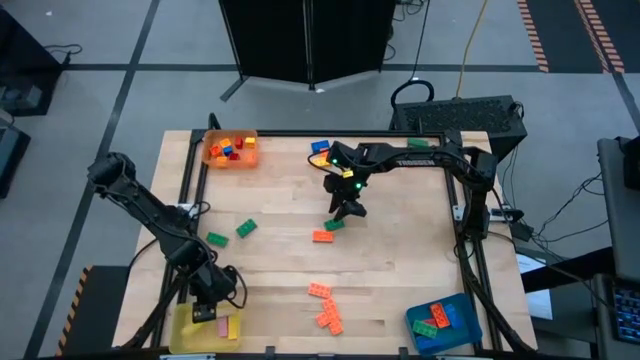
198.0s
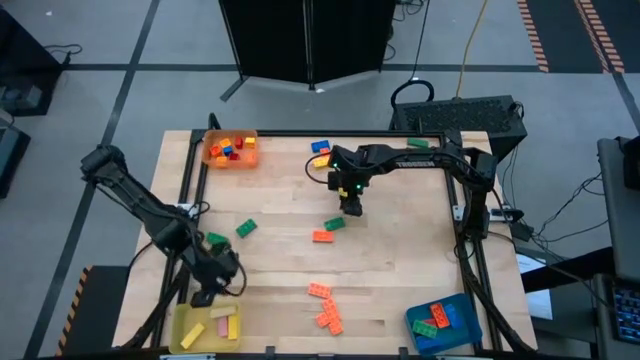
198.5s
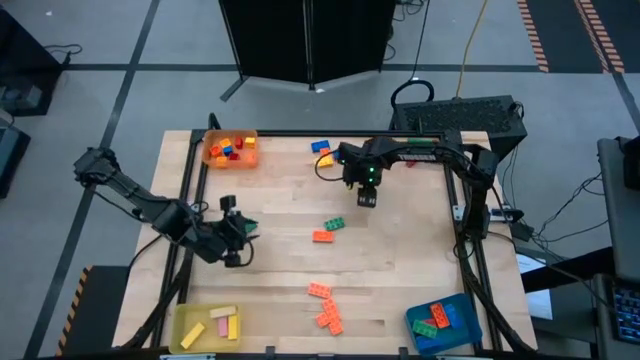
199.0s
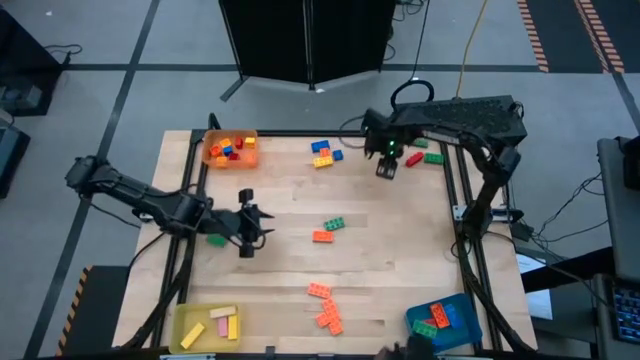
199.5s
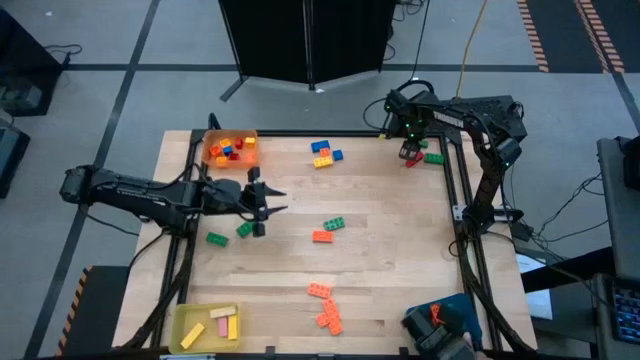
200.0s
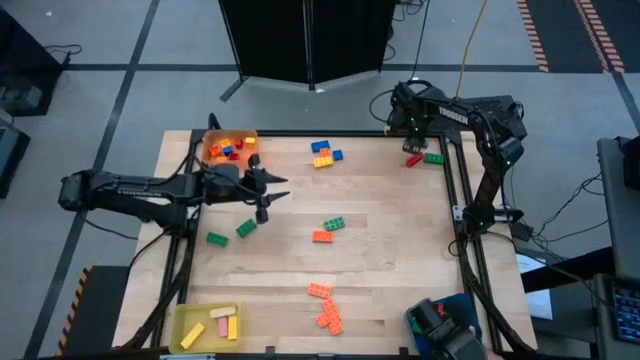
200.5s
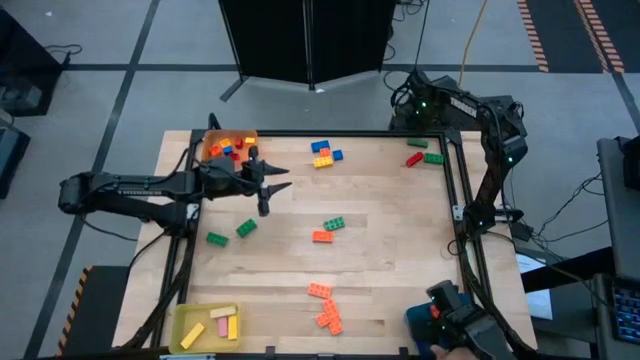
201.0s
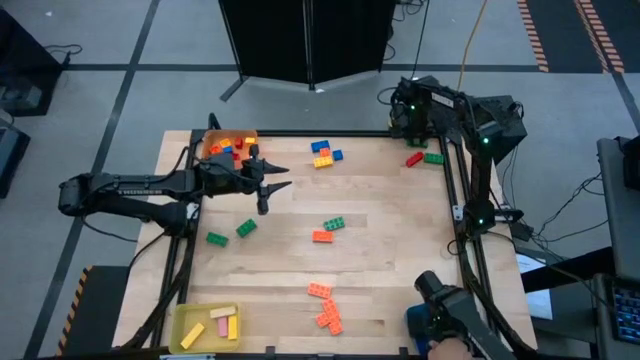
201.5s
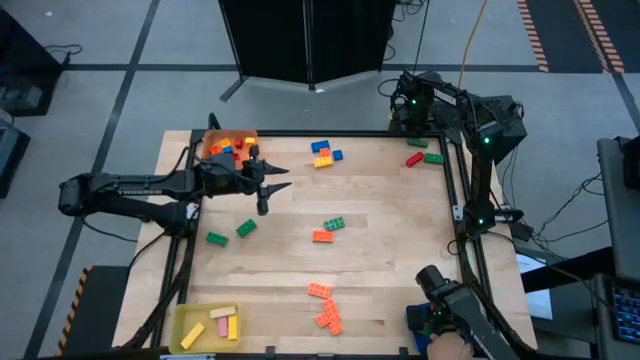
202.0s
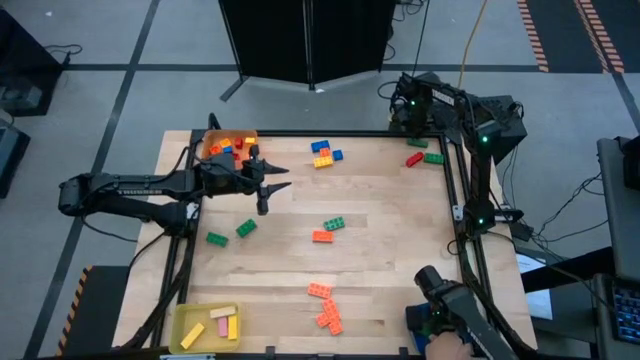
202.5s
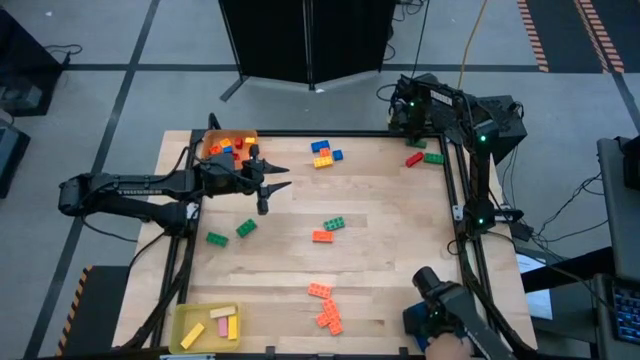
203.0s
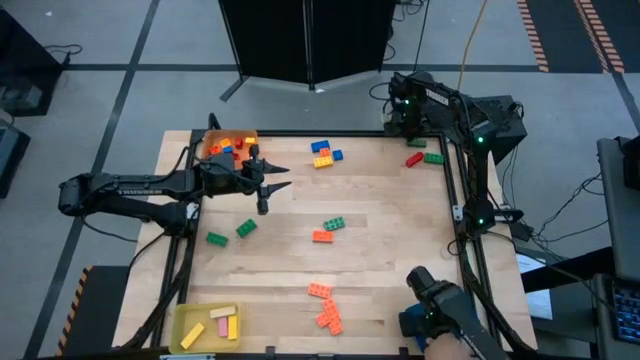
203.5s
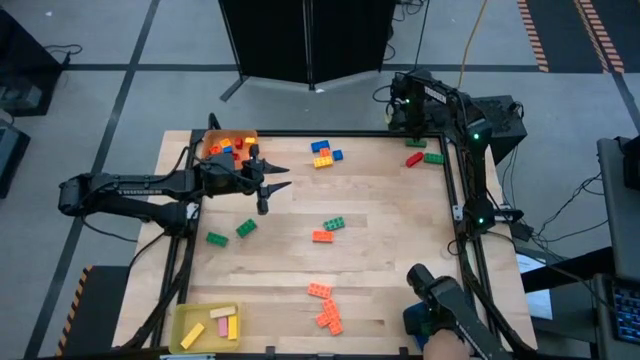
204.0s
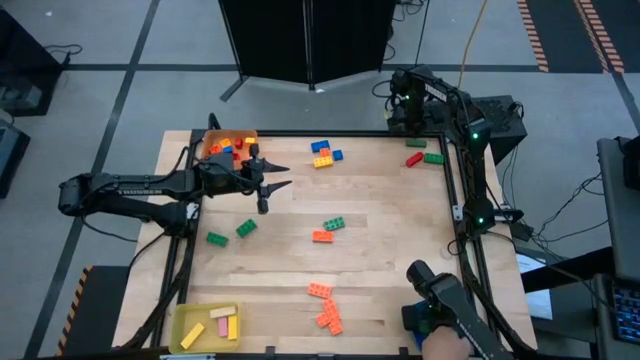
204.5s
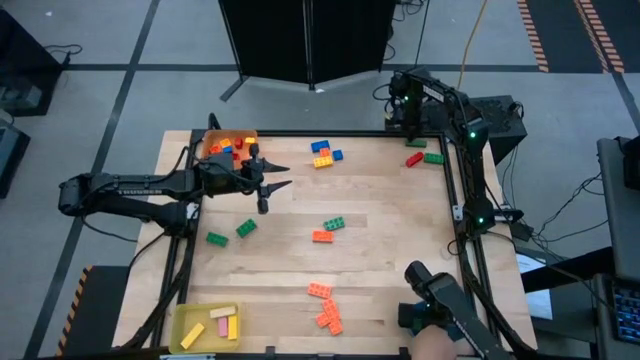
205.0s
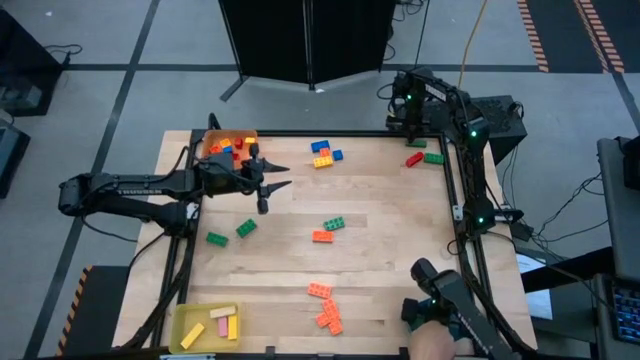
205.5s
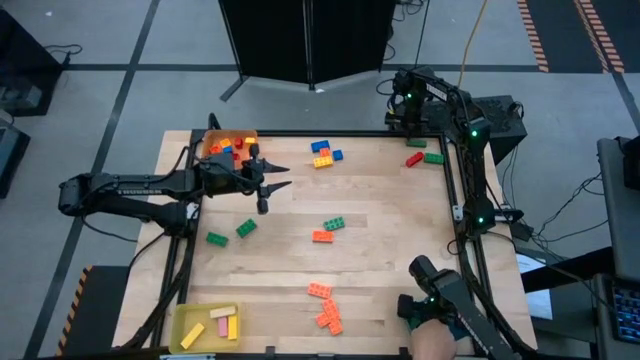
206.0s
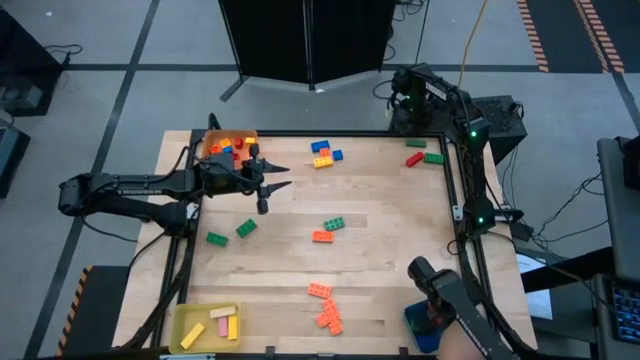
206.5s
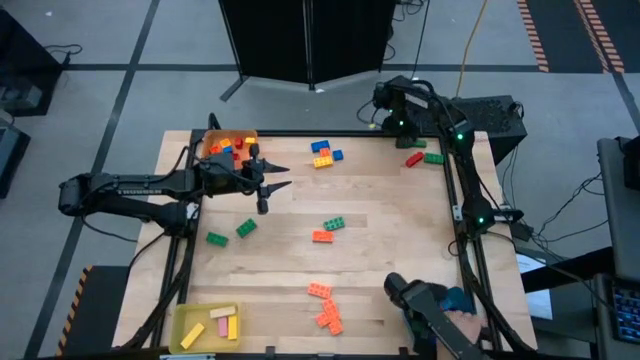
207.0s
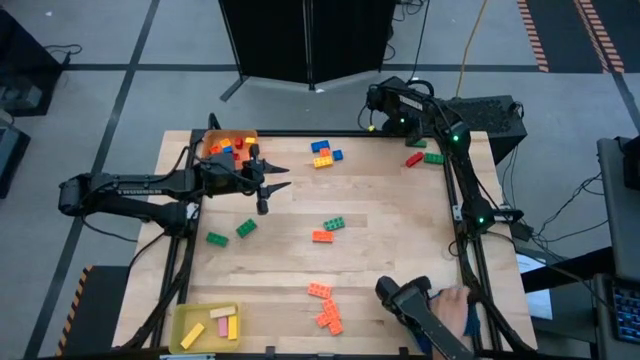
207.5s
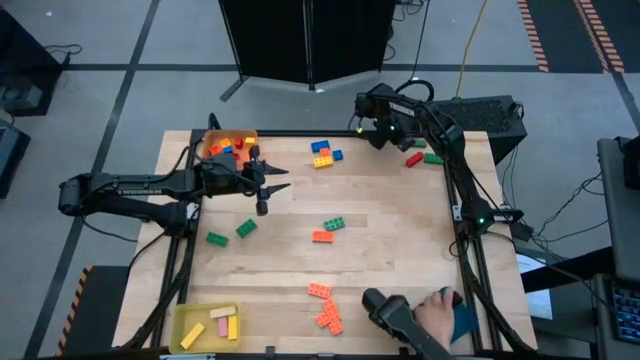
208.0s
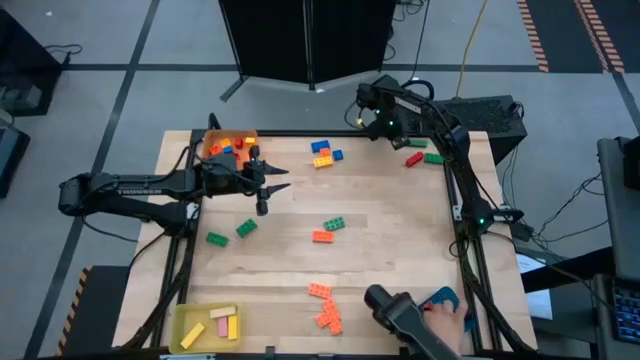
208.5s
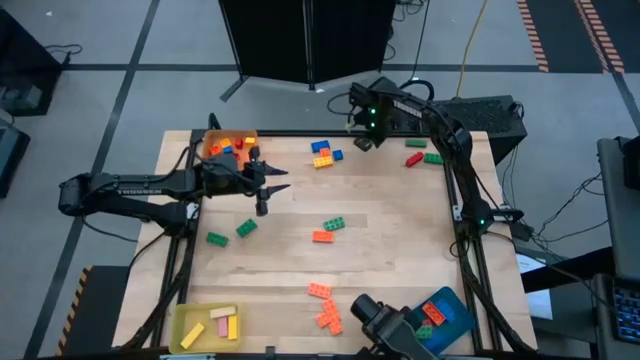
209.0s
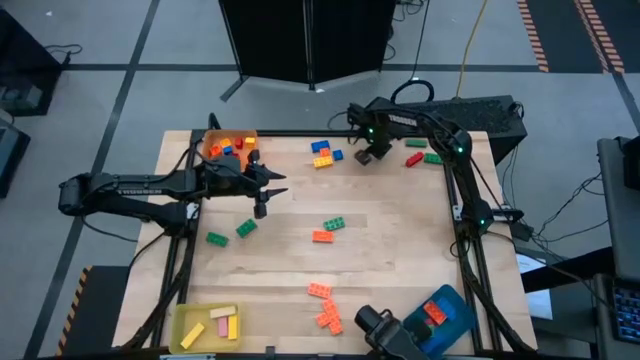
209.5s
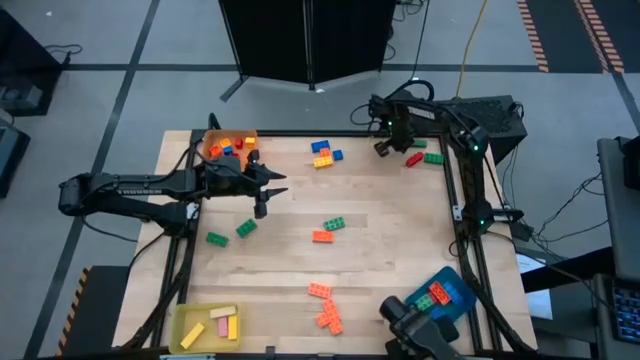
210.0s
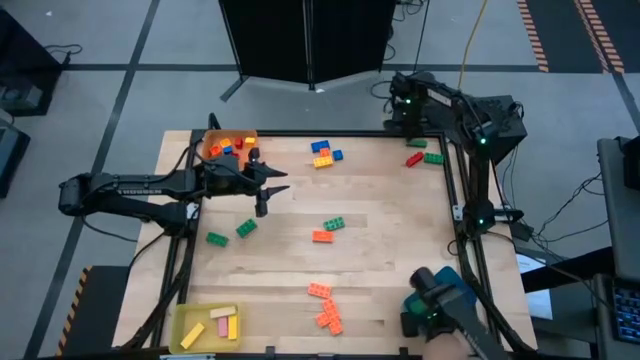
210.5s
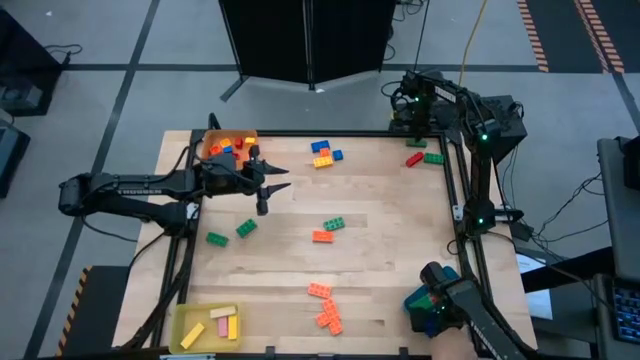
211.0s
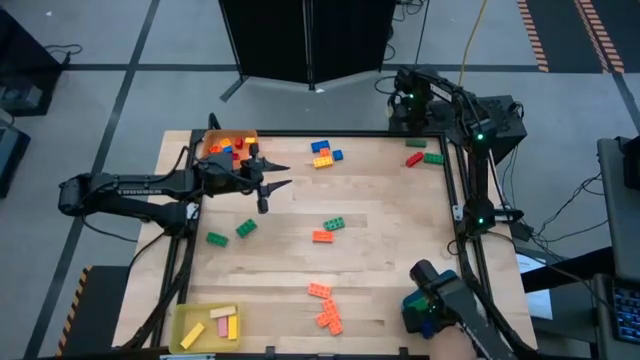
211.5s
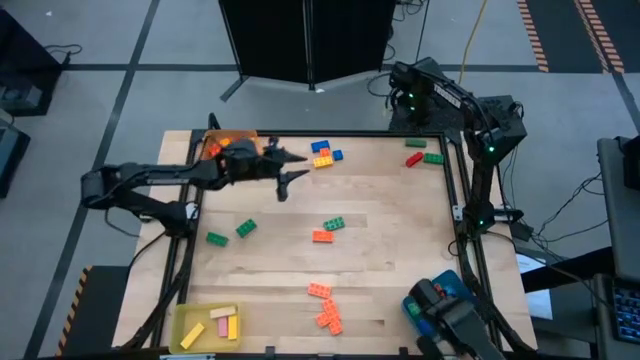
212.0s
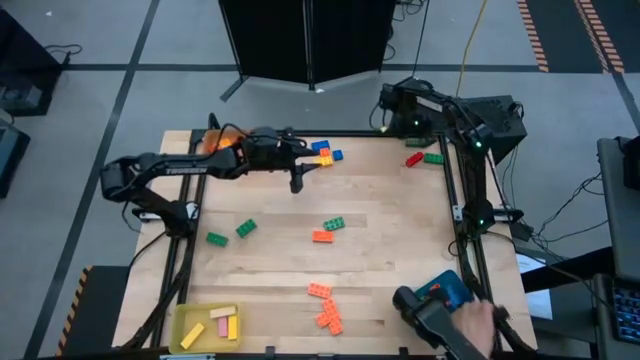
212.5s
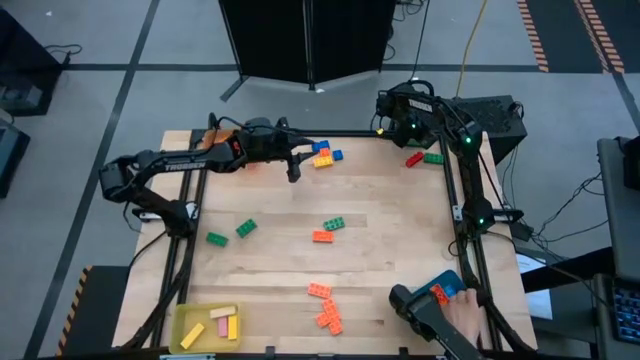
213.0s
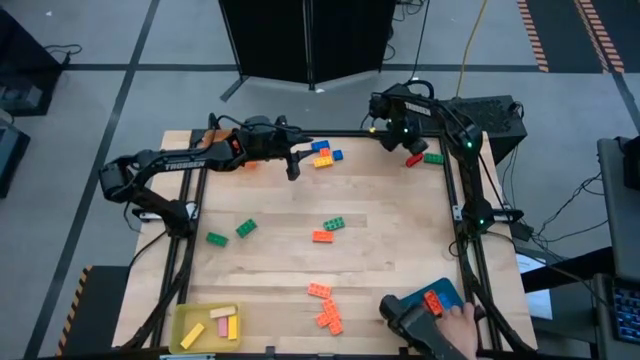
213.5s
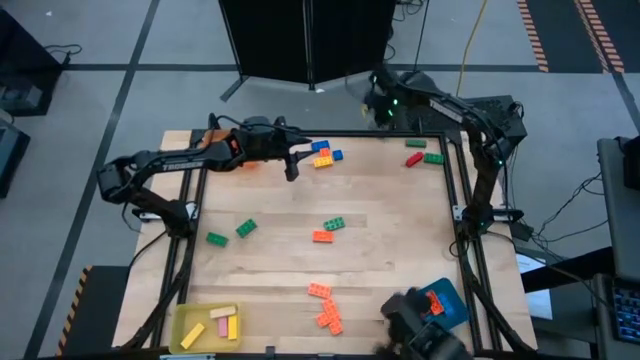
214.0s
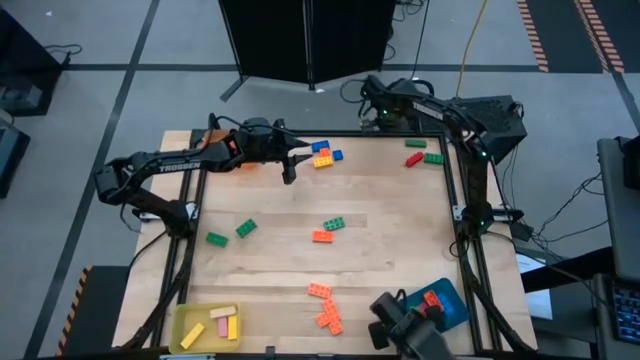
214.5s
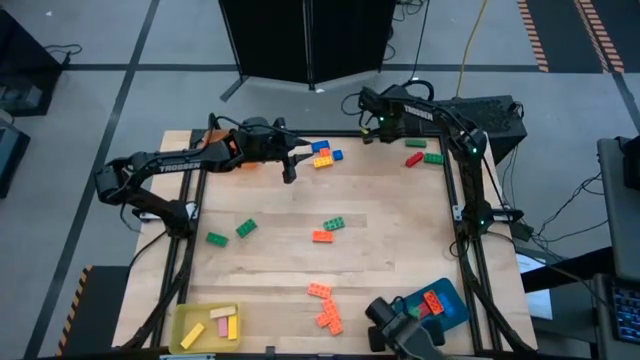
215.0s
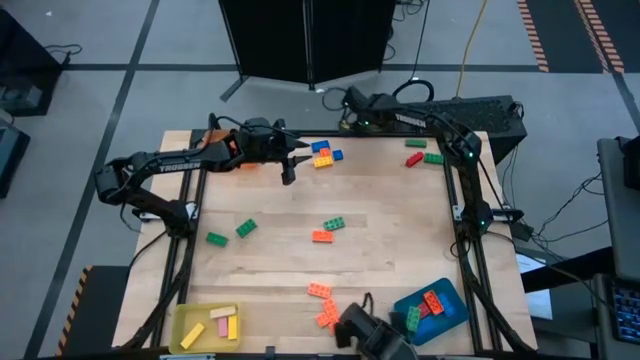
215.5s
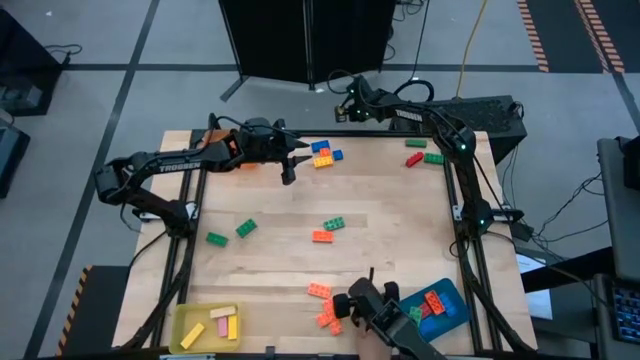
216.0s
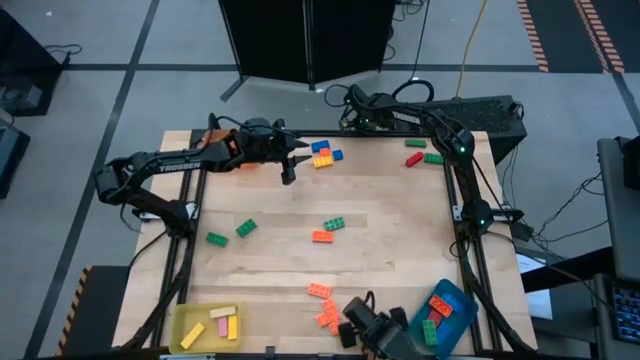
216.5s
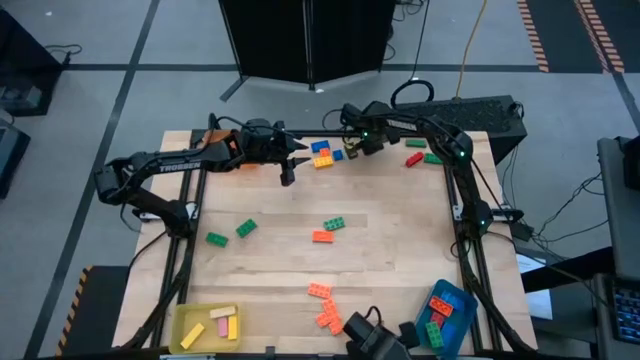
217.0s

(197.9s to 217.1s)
Task: Sort blocks by size
Put the green block into the yellow bin

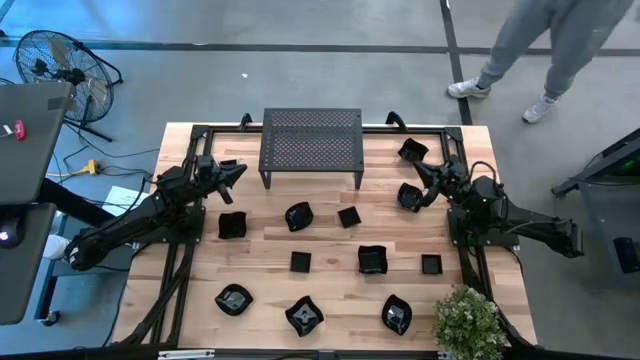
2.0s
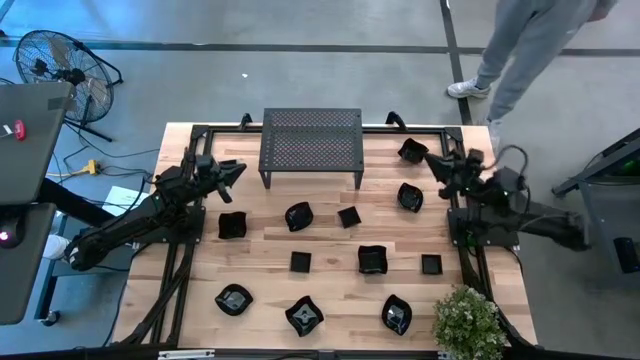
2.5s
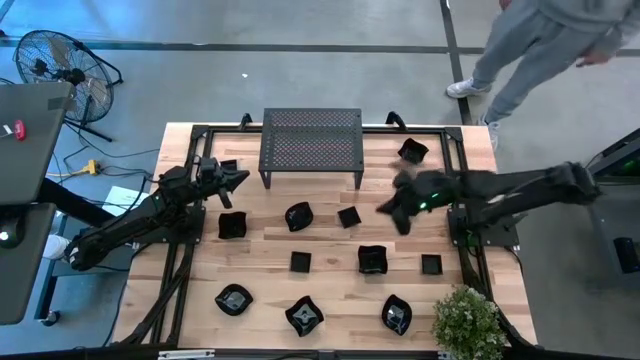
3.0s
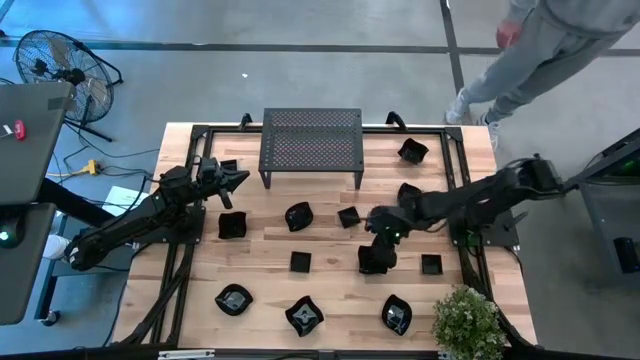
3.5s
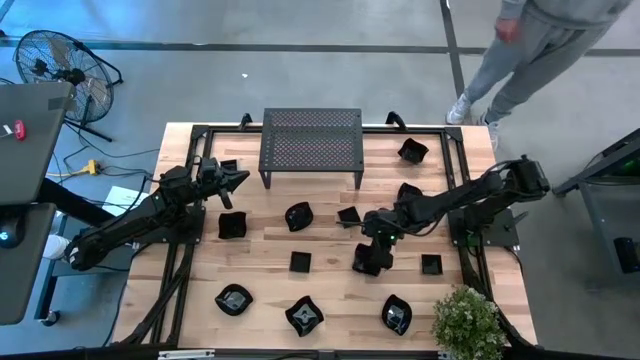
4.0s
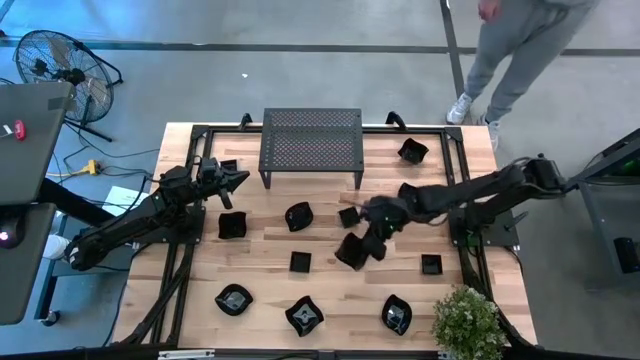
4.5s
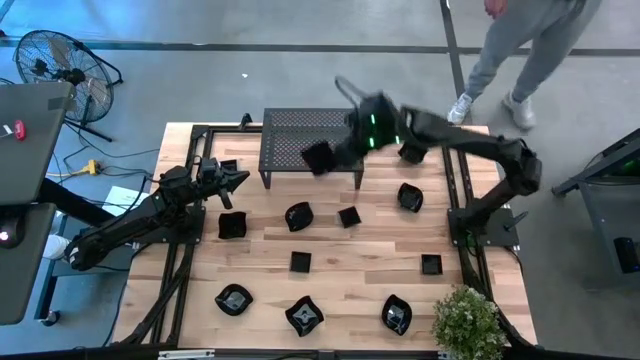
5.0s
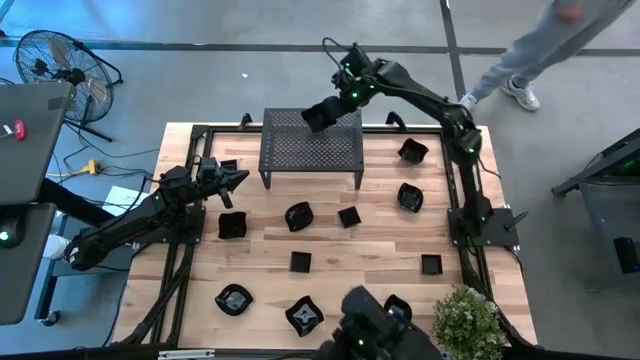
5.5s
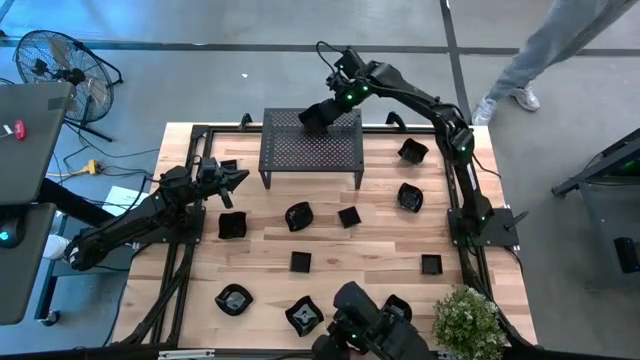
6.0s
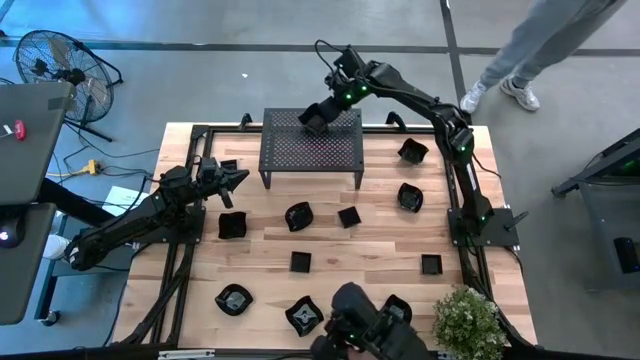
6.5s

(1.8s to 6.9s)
Task: Pick & Place Mini shaped plates
Put the black distorted square plate on the shelf
